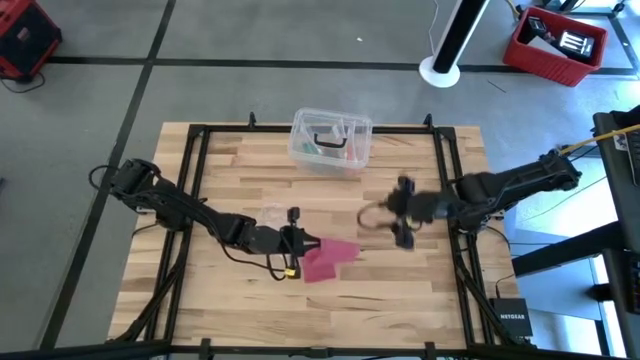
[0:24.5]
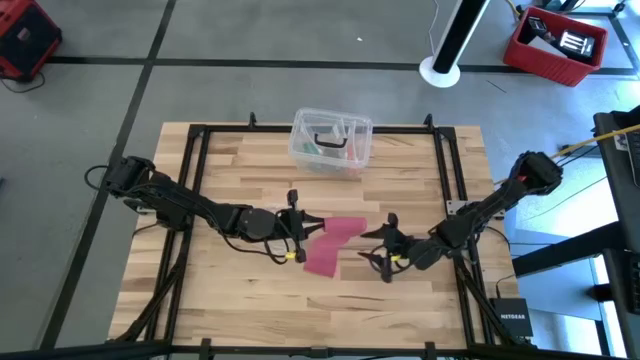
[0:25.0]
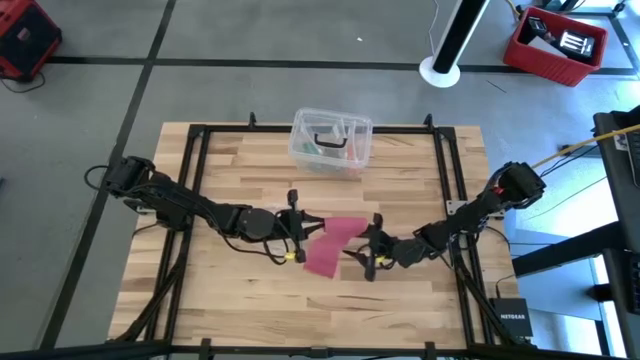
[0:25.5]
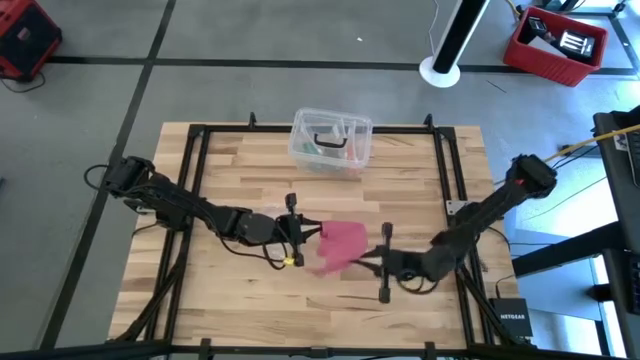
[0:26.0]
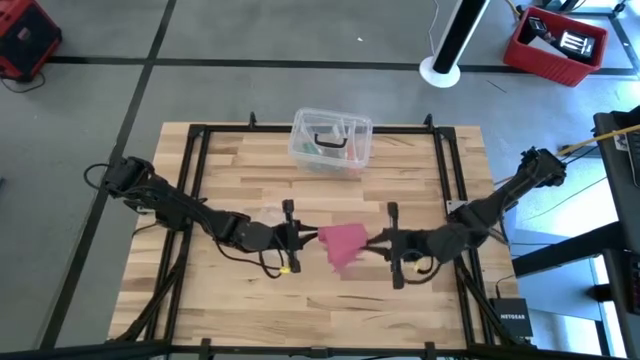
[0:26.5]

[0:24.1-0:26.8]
Task: Roll bandage
Roll the pink bandage

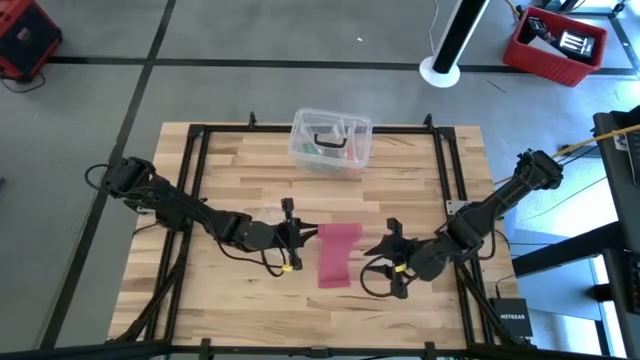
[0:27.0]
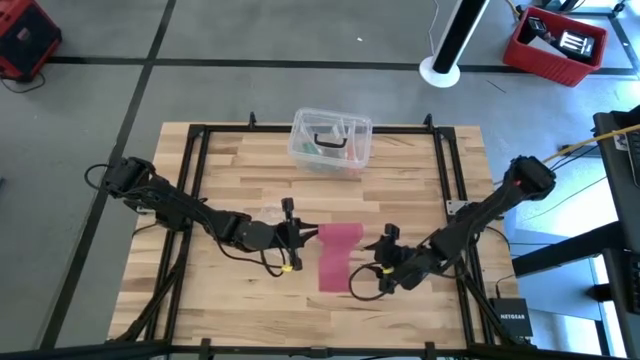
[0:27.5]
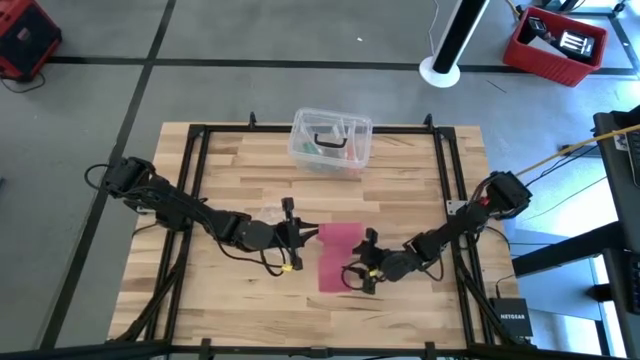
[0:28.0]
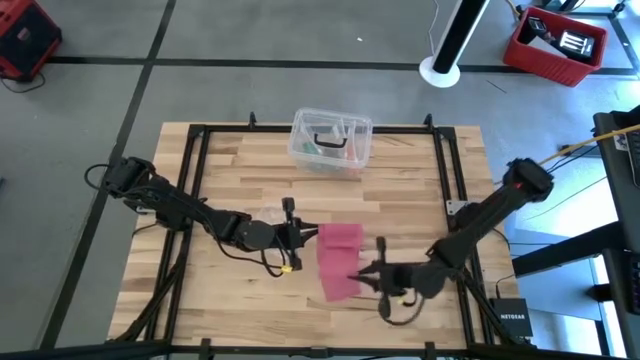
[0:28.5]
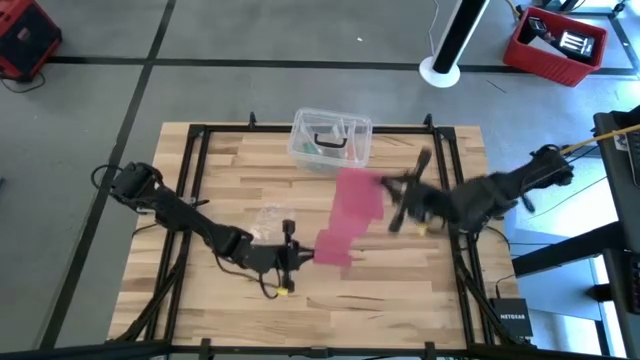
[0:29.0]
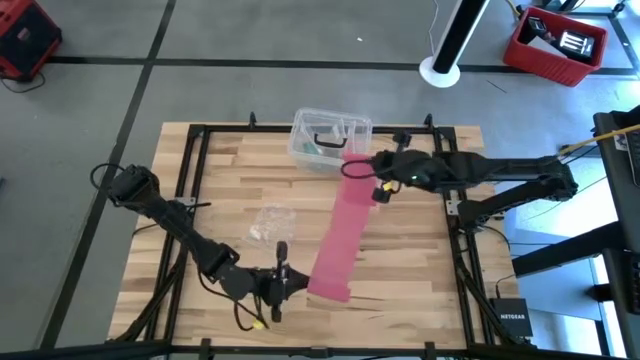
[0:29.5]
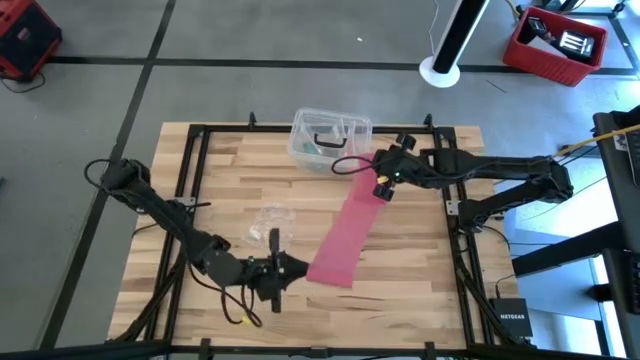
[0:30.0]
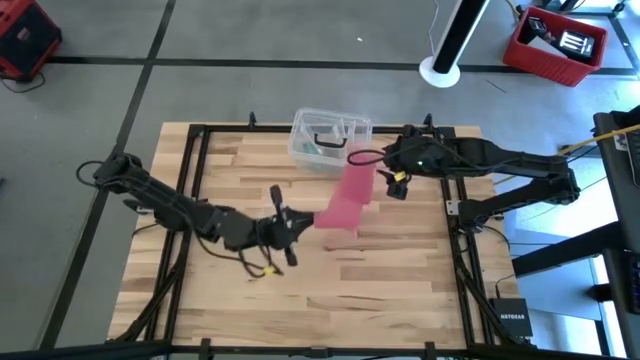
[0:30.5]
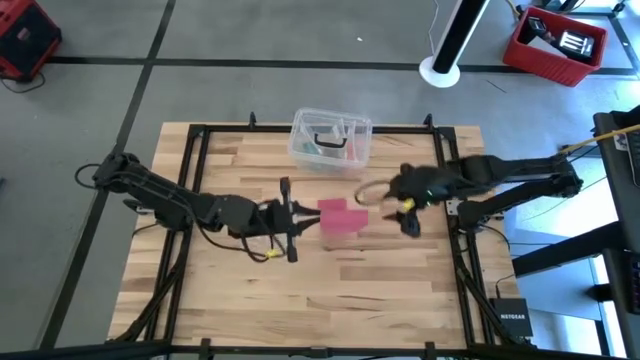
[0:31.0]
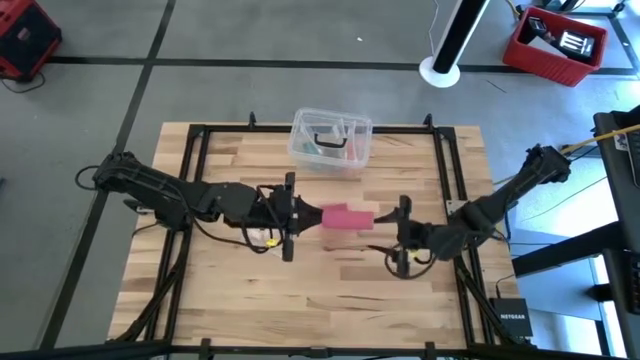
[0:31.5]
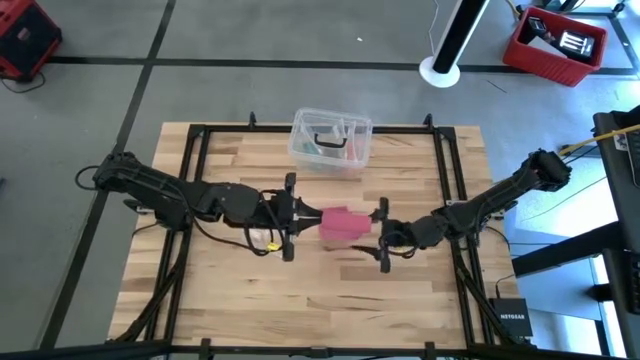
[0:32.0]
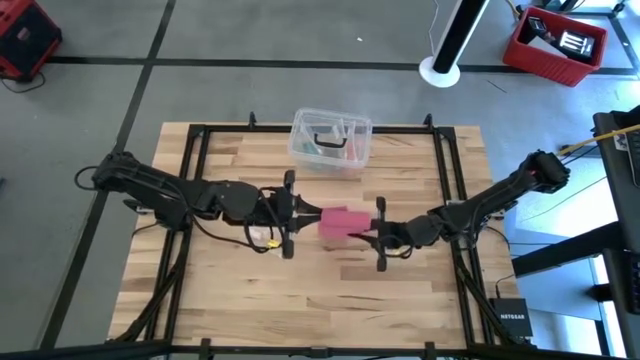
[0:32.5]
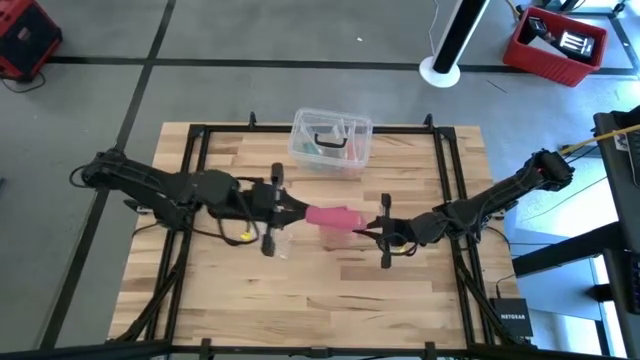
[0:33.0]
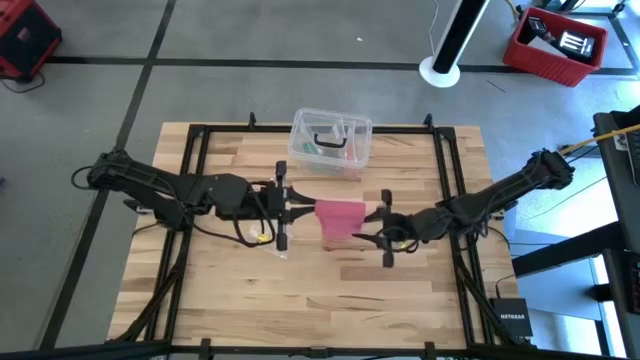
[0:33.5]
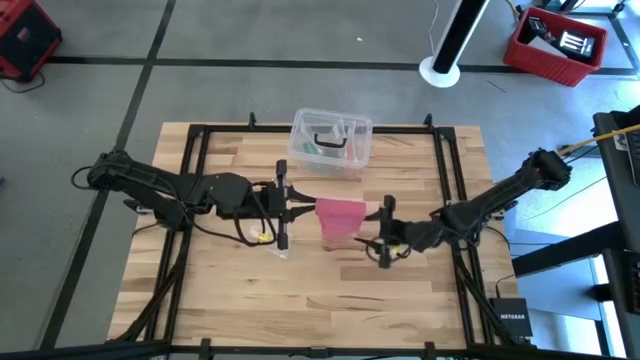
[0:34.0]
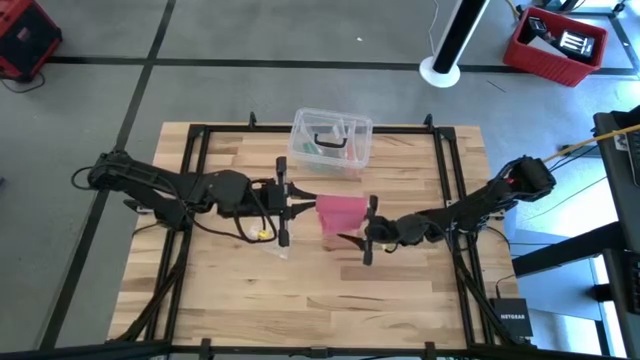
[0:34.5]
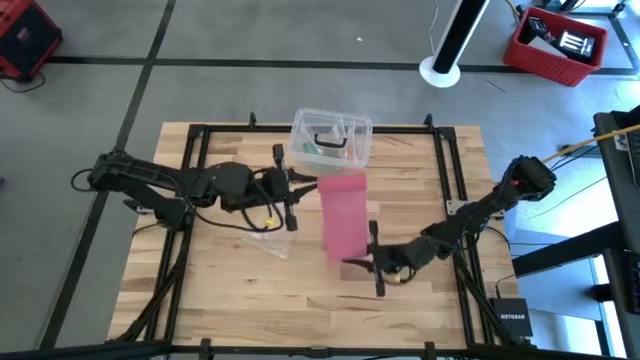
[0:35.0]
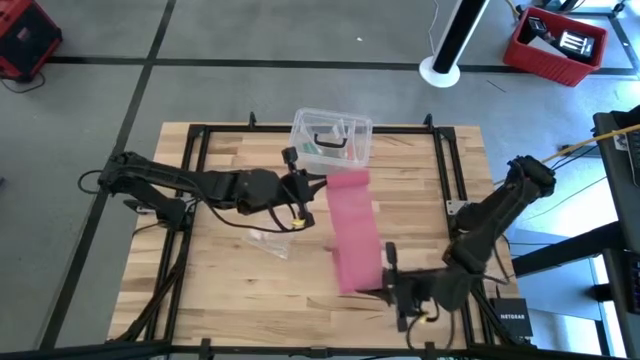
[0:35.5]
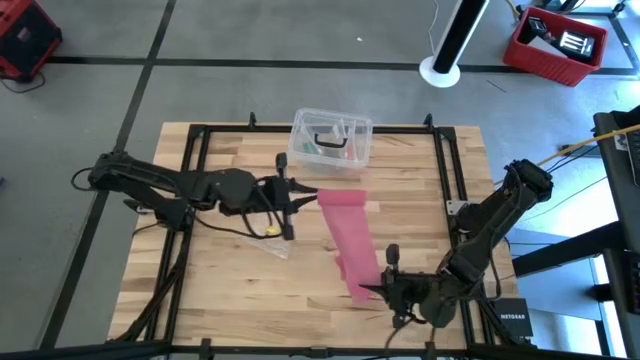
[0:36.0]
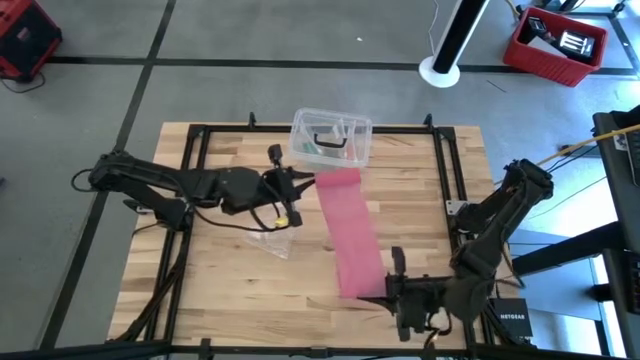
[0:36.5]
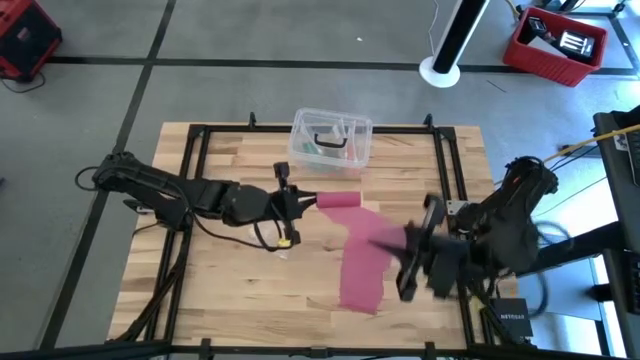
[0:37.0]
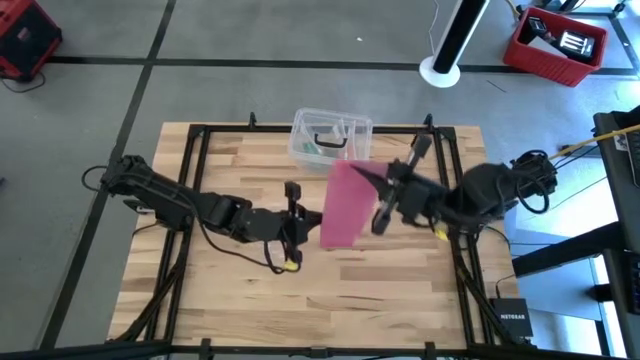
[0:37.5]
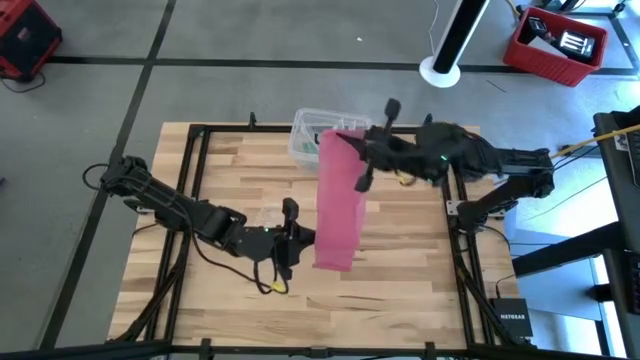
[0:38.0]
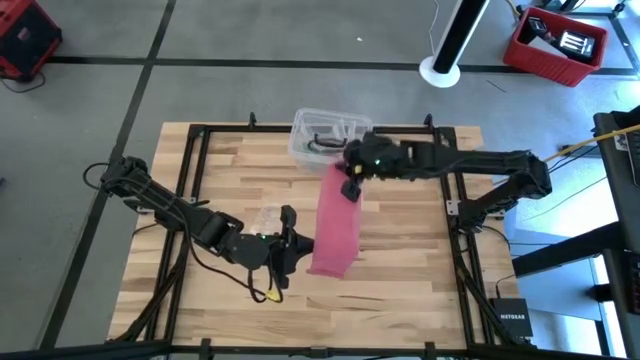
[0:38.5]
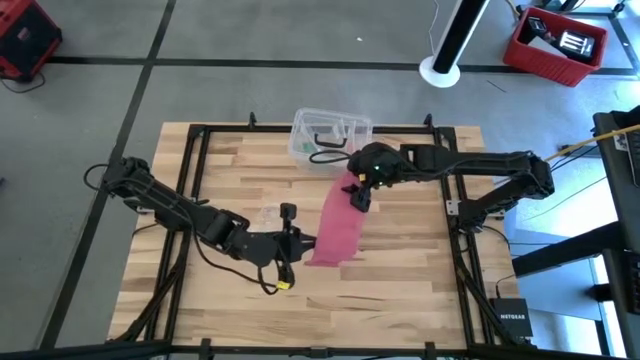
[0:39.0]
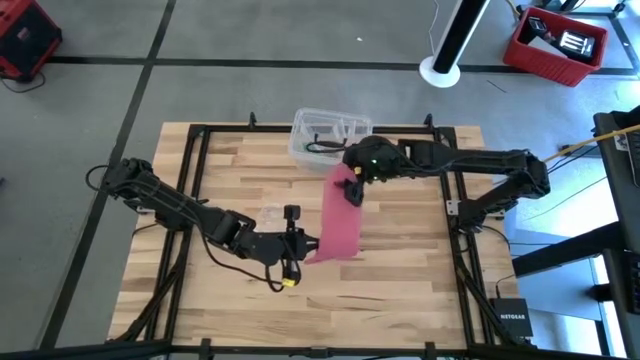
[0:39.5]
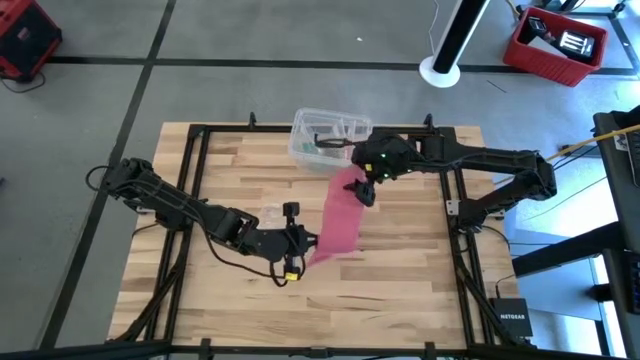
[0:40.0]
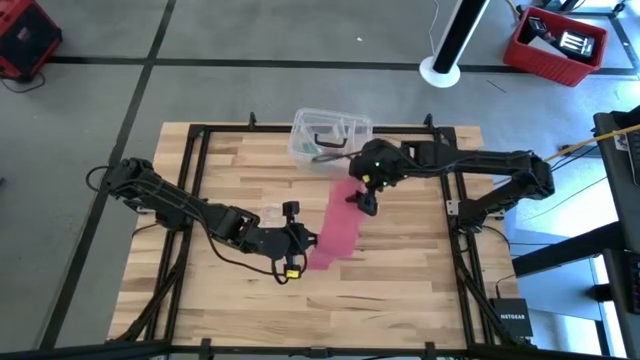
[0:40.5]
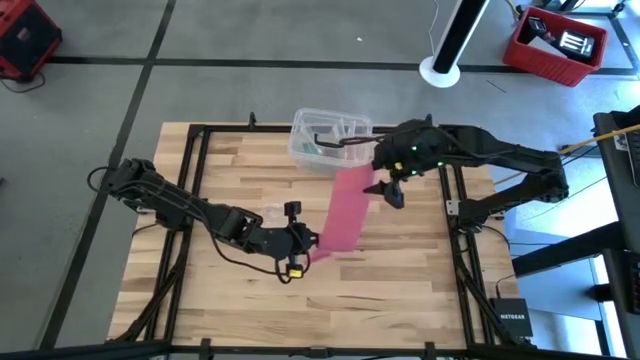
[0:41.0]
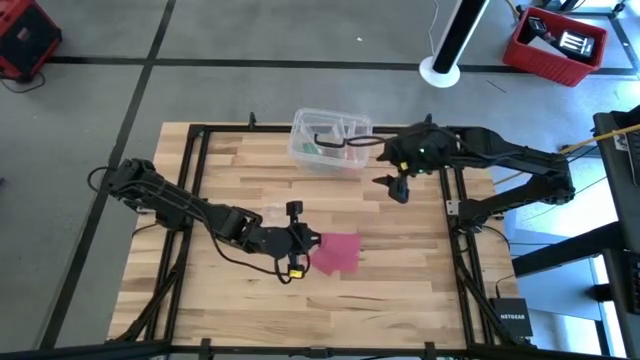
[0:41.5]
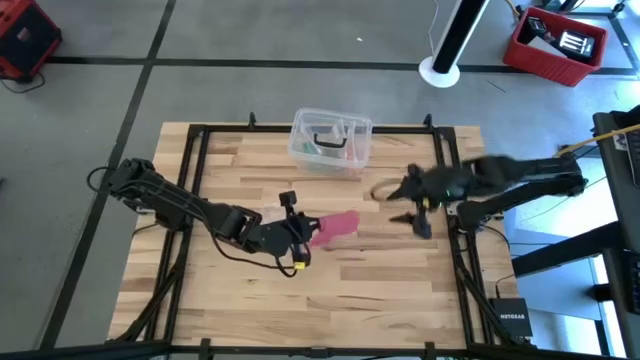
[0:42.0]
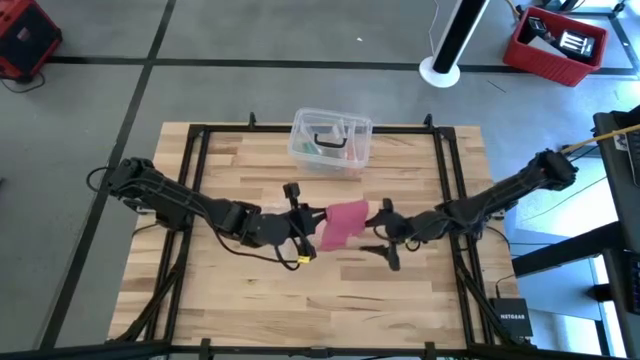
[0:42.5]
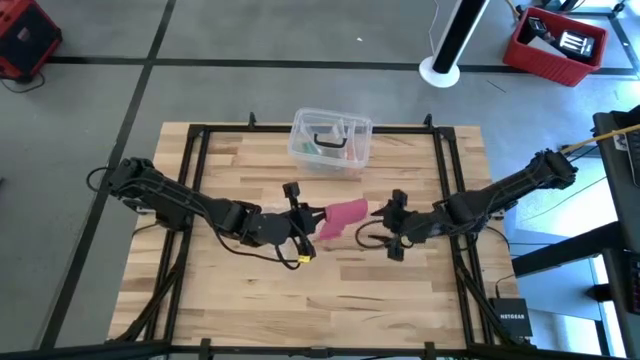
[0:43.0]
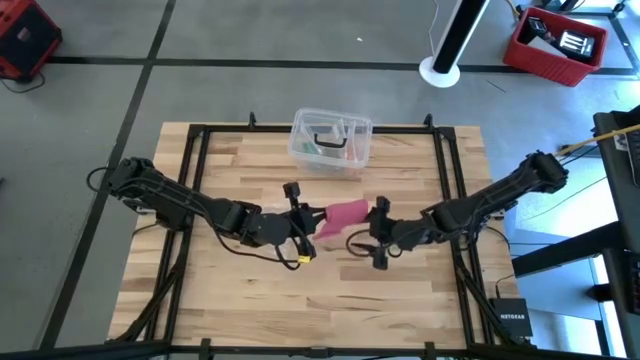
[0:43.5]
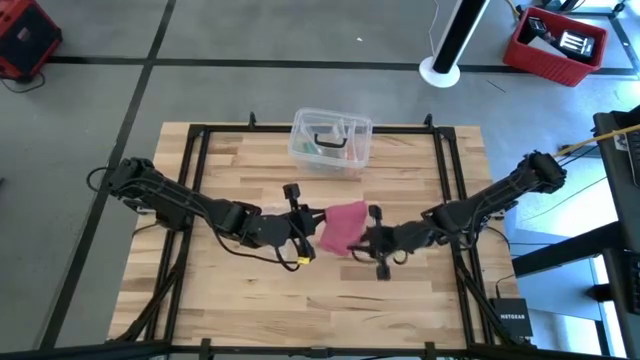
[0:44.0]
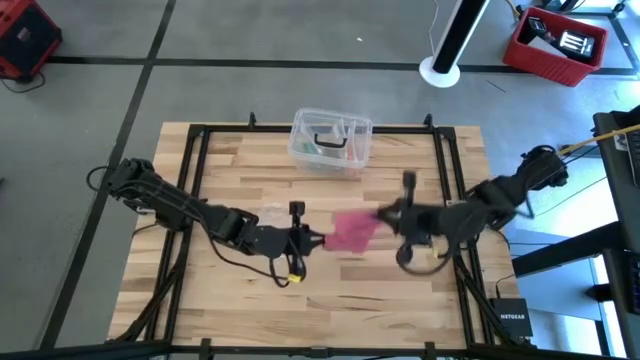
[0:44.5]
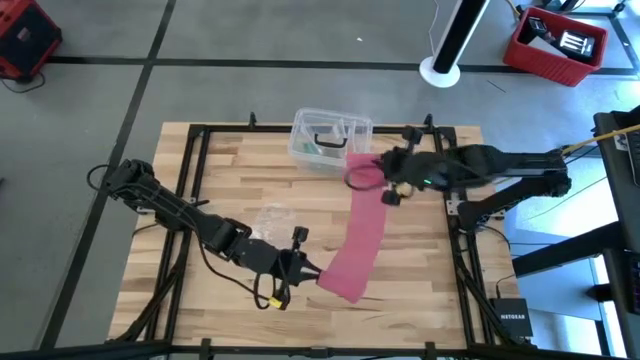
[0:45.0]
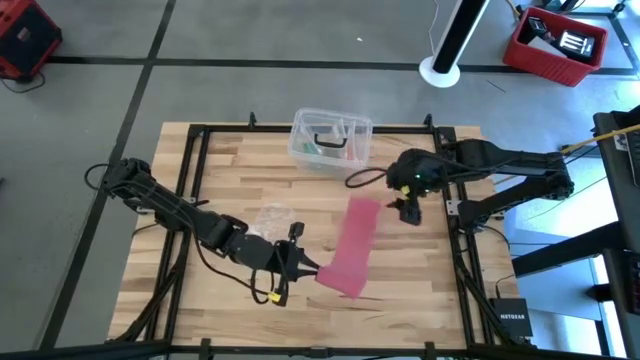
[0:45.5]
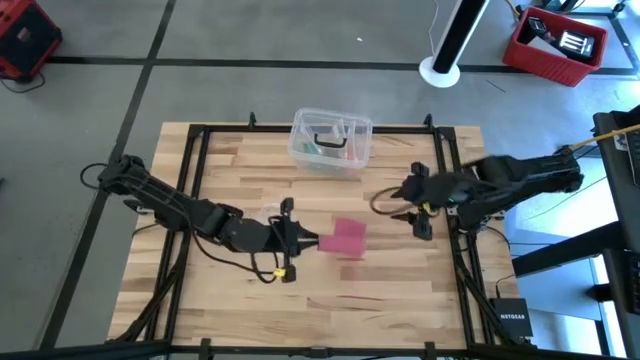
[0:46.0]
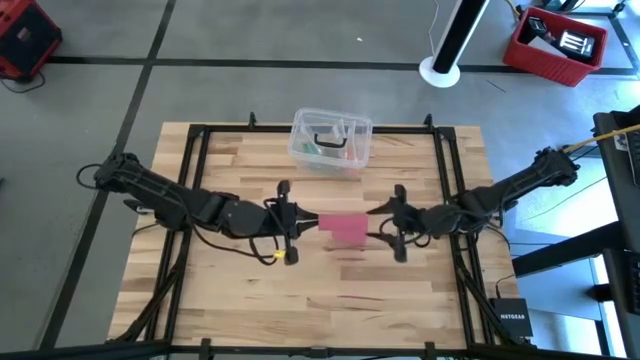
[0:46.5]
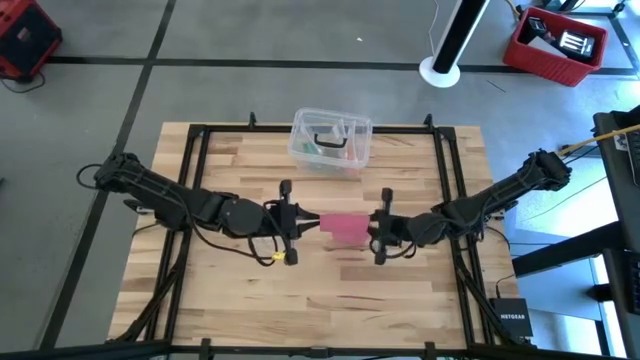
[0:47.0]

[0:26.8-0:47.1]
Roll the pink bandage
